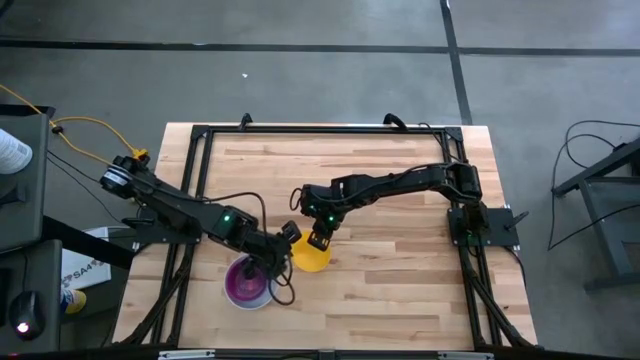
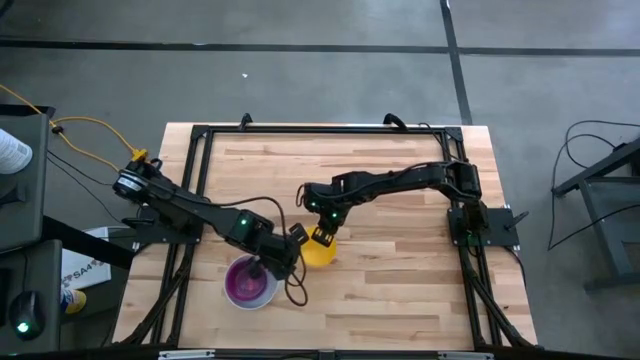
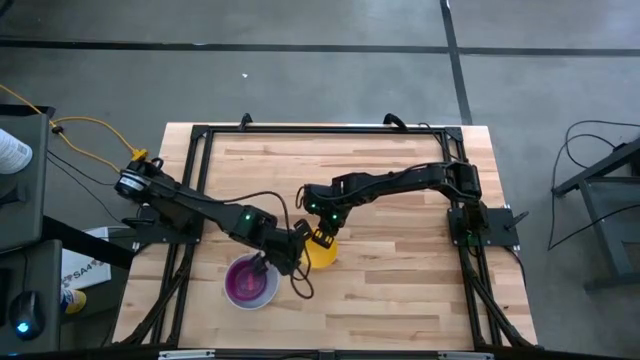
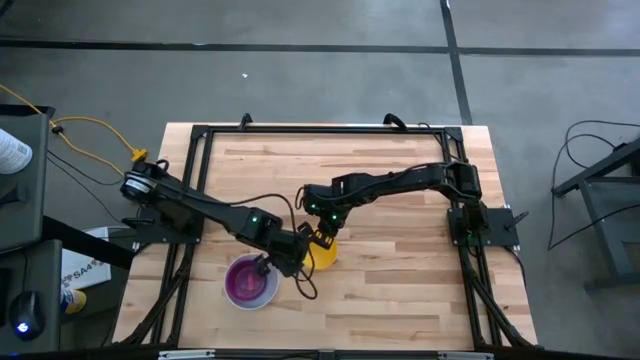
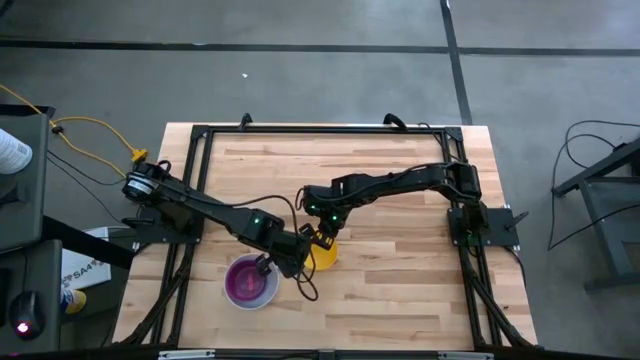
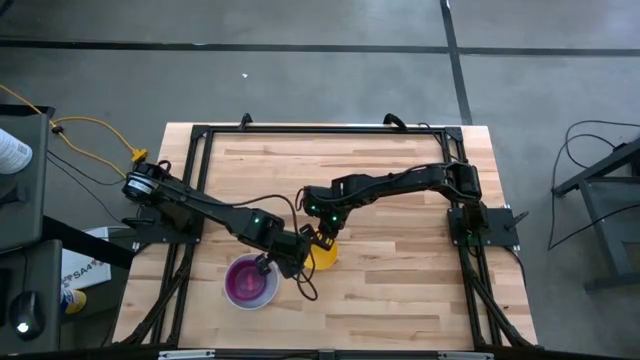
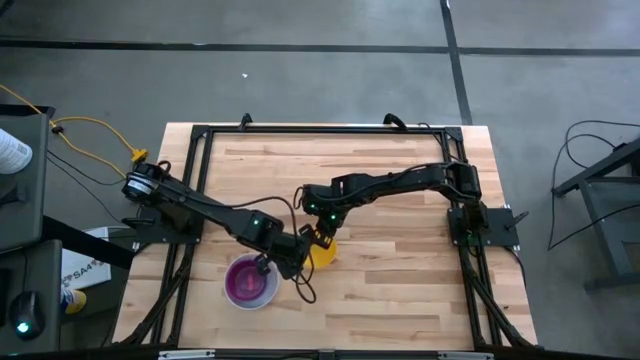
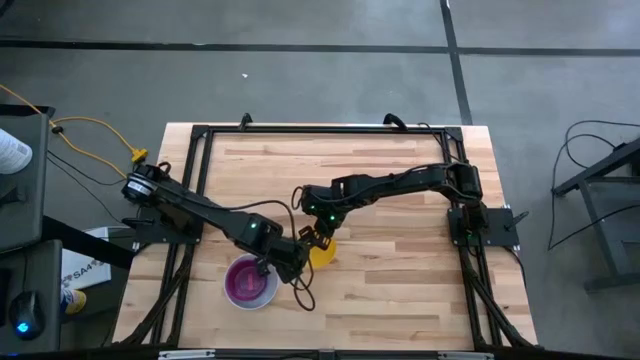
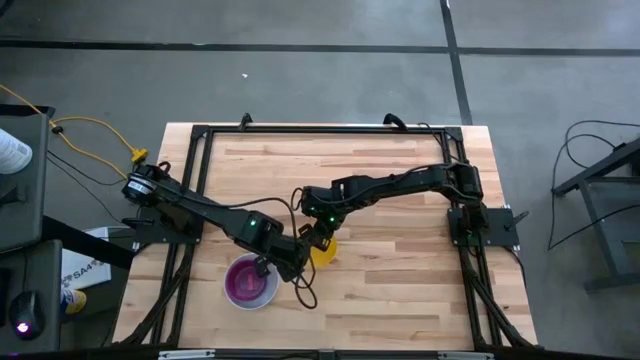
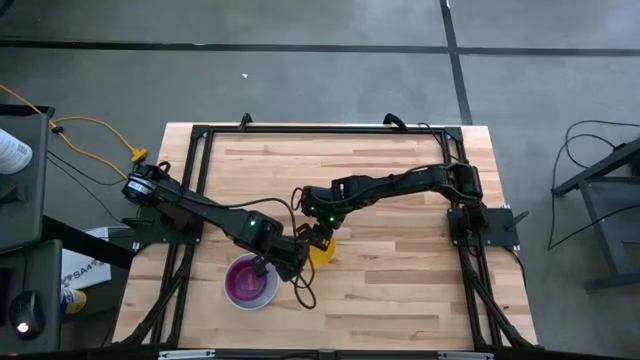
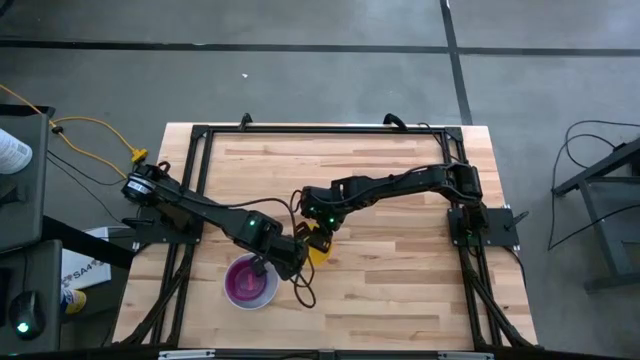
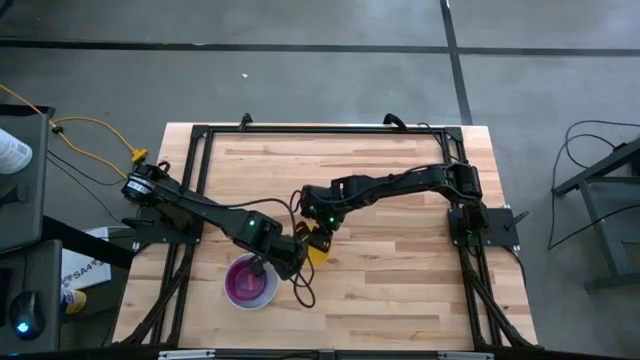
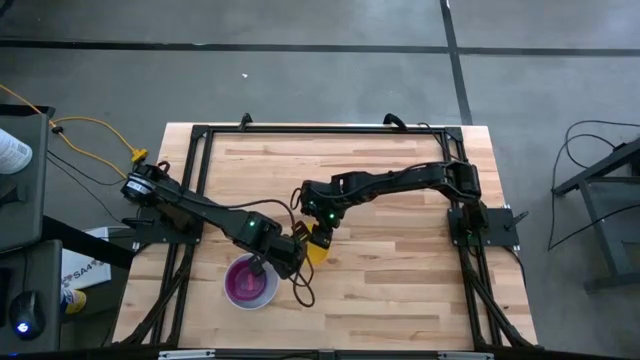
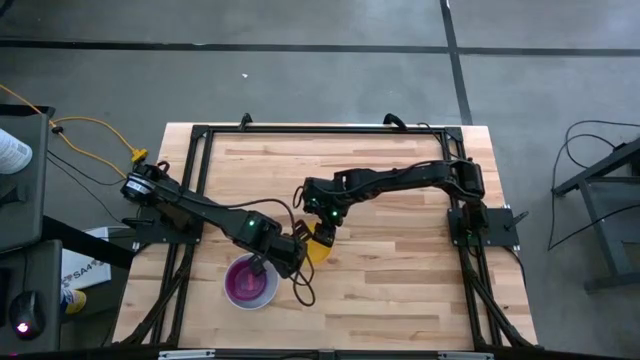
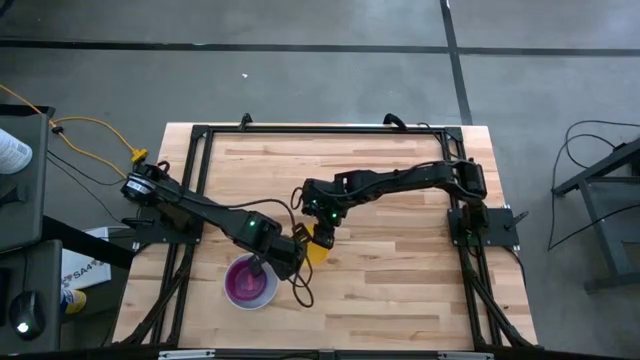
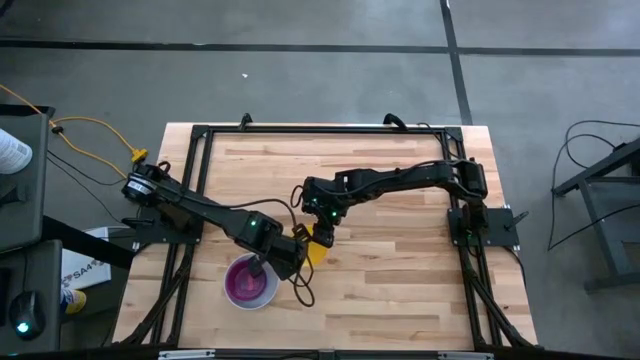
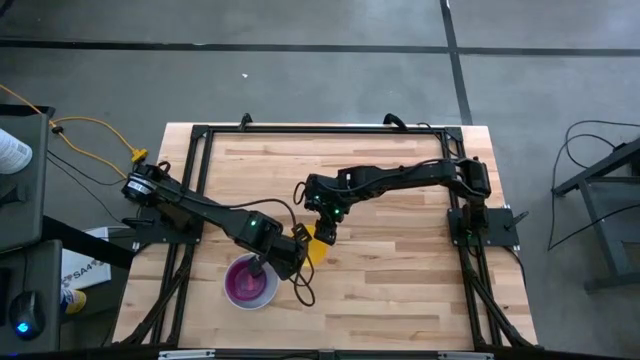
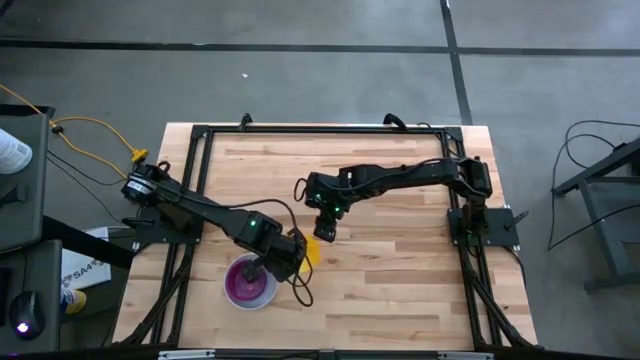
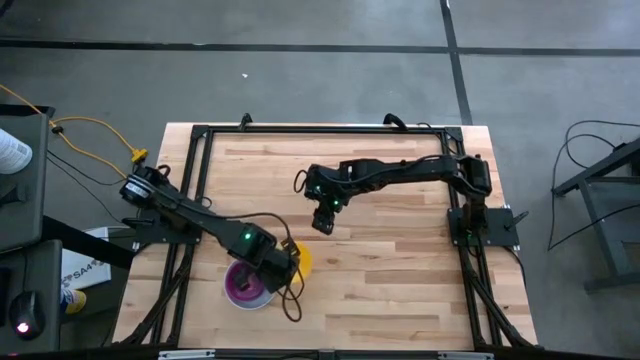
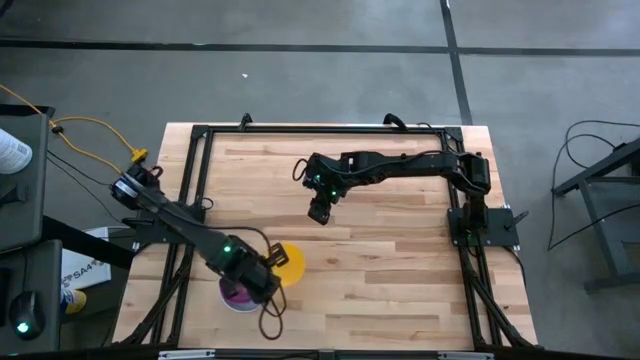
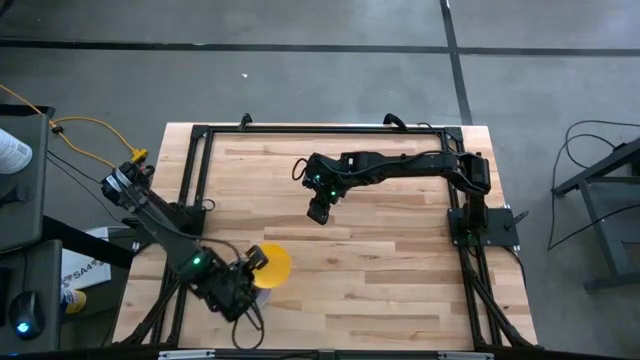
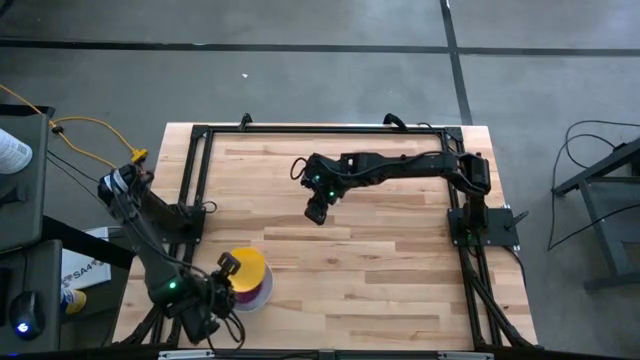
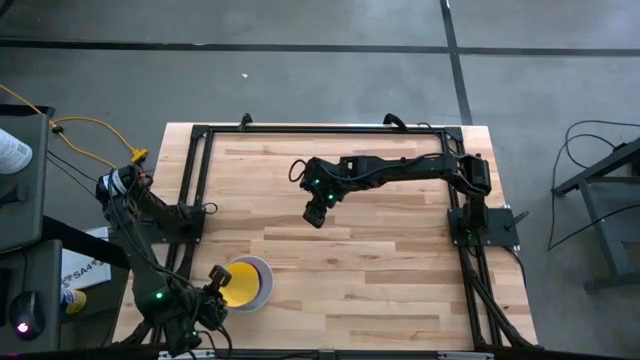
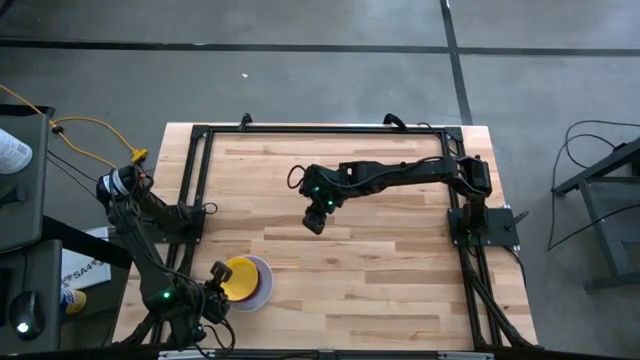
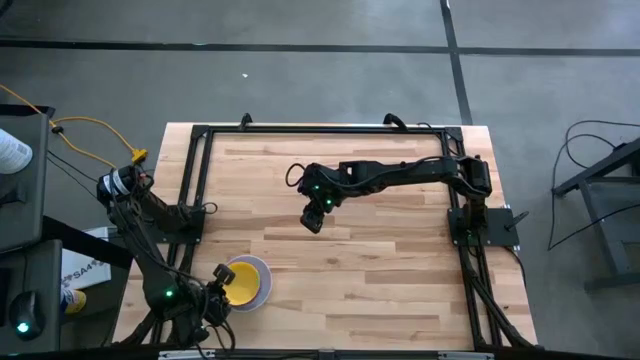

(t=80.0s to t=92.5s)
Stack the yellow bowl on the red bowl
